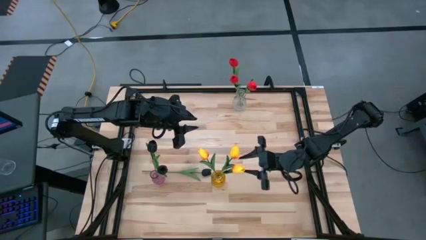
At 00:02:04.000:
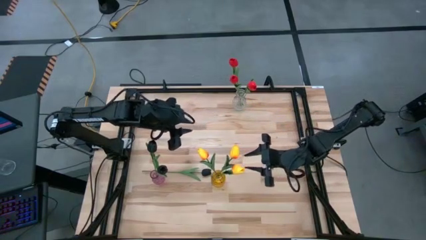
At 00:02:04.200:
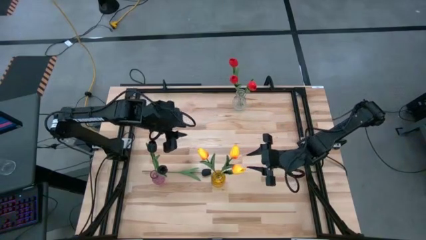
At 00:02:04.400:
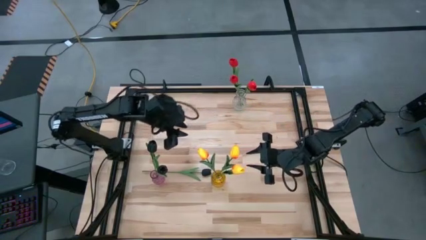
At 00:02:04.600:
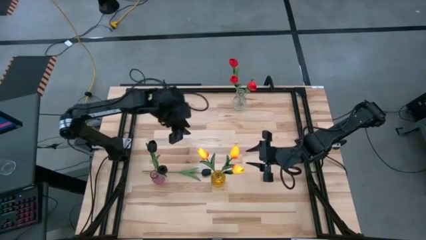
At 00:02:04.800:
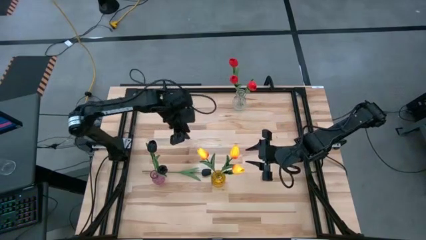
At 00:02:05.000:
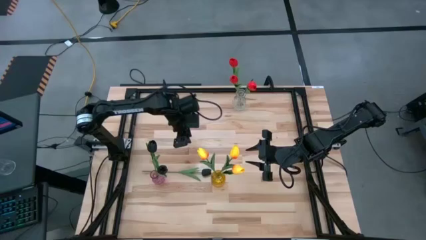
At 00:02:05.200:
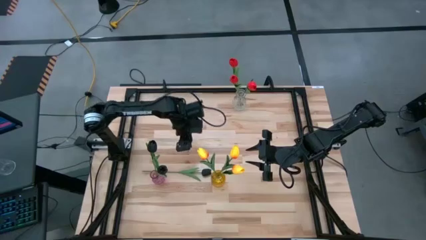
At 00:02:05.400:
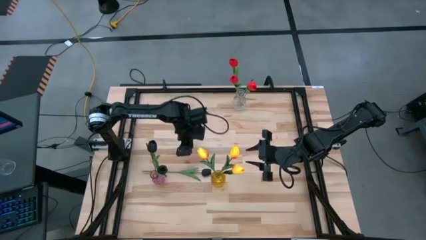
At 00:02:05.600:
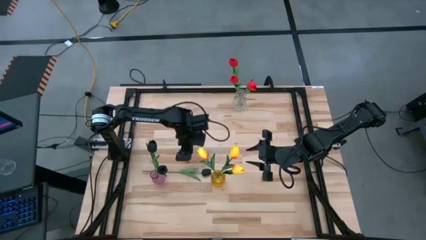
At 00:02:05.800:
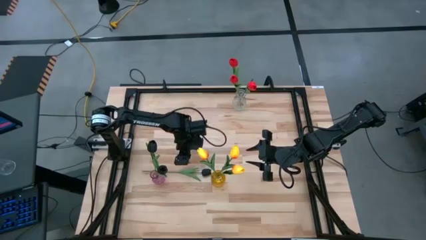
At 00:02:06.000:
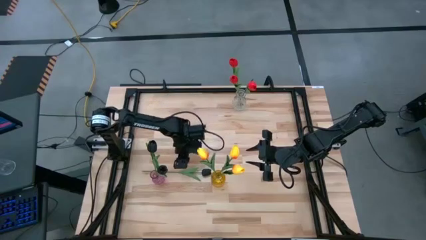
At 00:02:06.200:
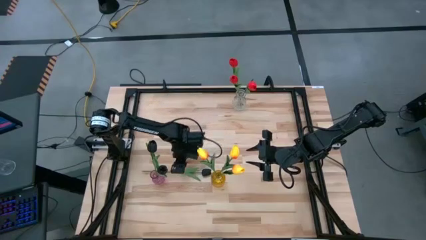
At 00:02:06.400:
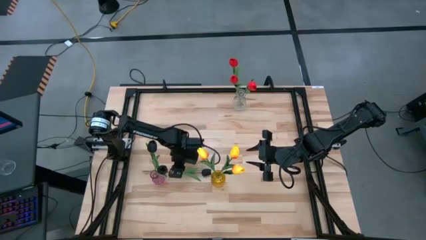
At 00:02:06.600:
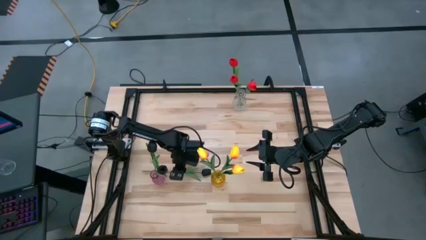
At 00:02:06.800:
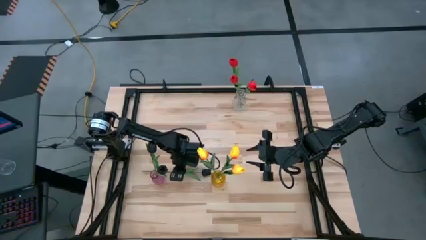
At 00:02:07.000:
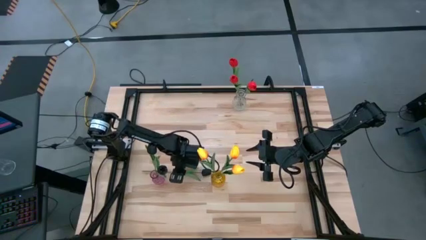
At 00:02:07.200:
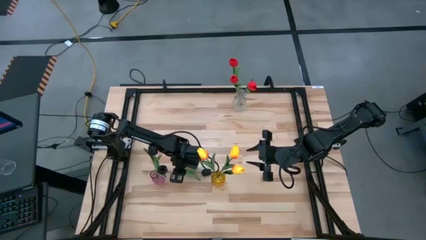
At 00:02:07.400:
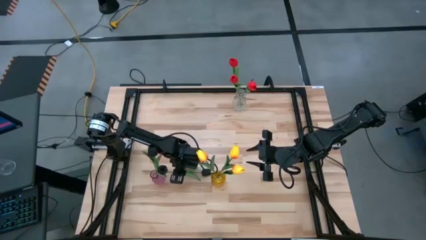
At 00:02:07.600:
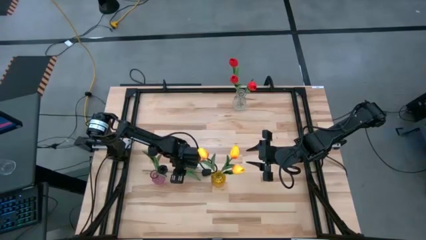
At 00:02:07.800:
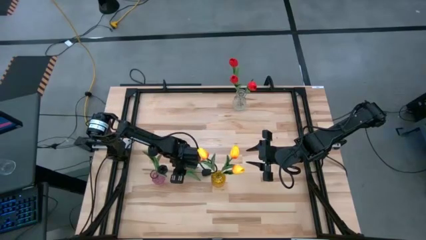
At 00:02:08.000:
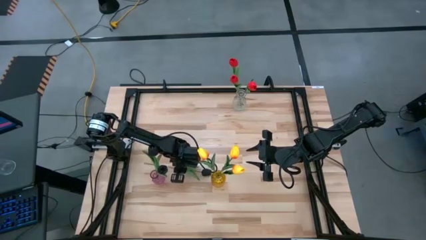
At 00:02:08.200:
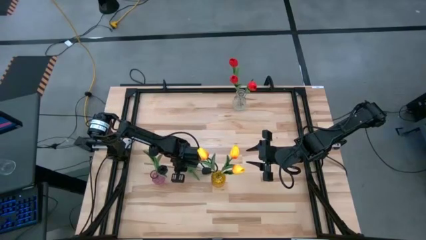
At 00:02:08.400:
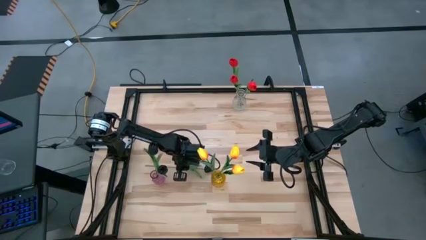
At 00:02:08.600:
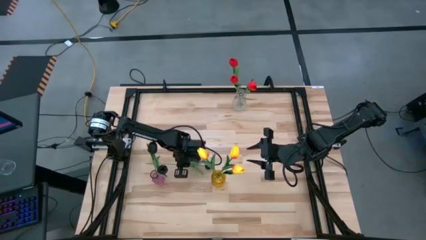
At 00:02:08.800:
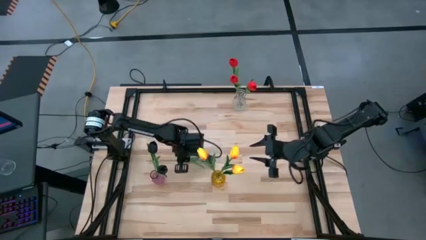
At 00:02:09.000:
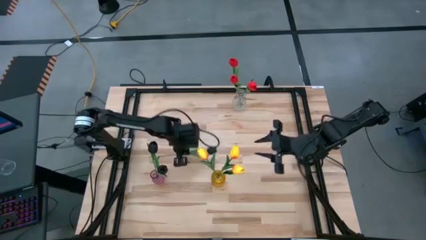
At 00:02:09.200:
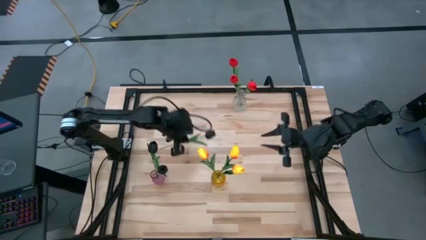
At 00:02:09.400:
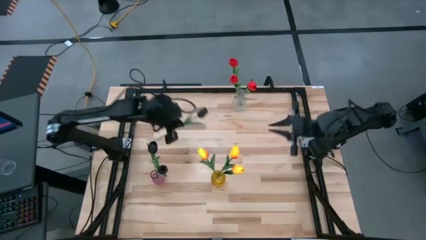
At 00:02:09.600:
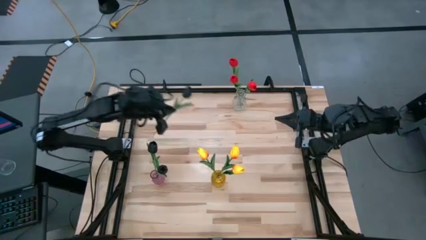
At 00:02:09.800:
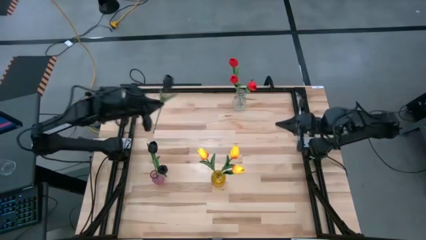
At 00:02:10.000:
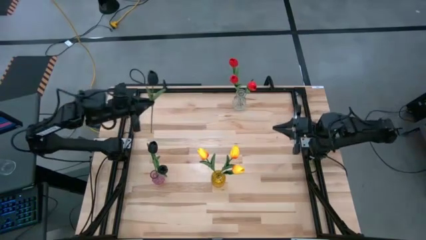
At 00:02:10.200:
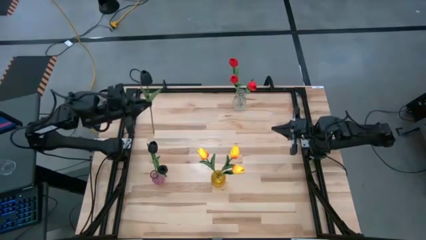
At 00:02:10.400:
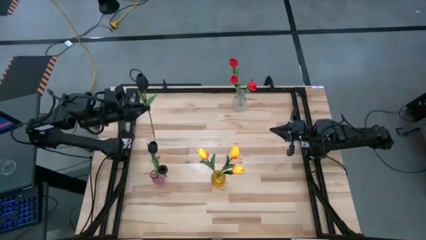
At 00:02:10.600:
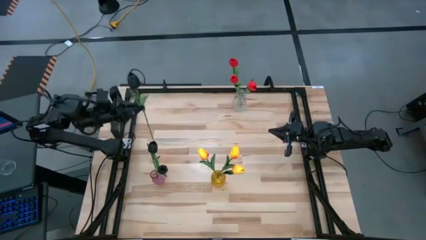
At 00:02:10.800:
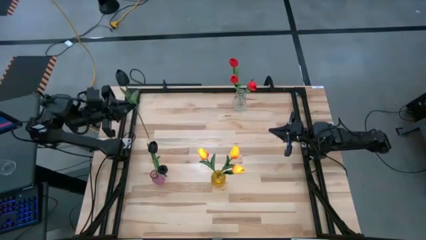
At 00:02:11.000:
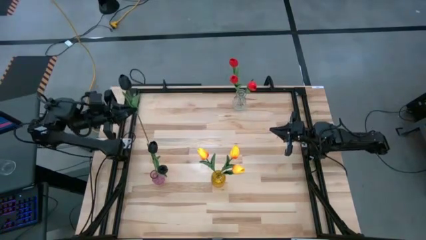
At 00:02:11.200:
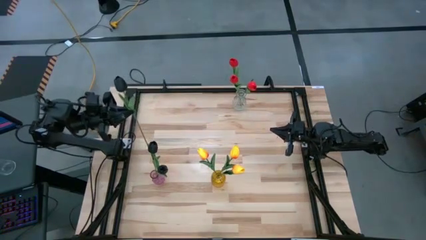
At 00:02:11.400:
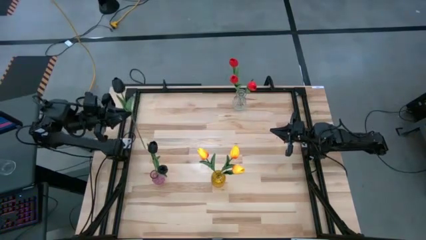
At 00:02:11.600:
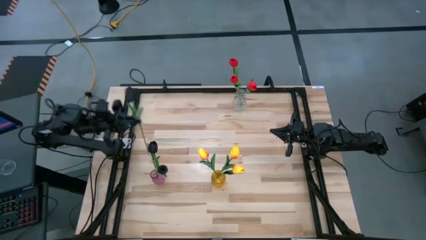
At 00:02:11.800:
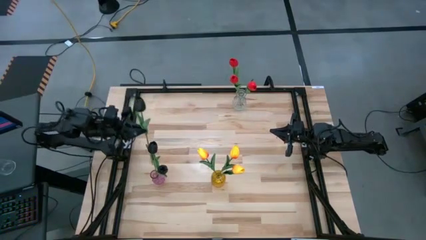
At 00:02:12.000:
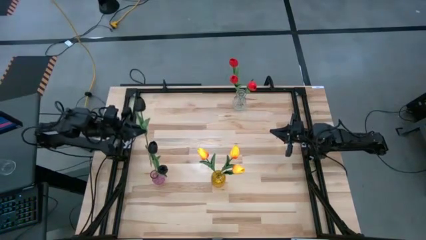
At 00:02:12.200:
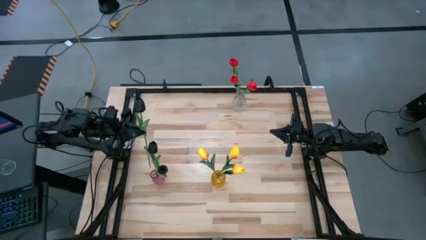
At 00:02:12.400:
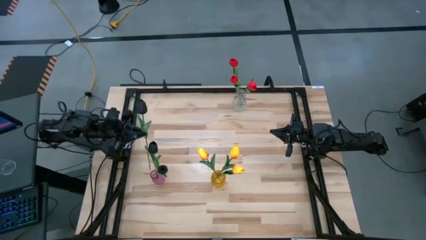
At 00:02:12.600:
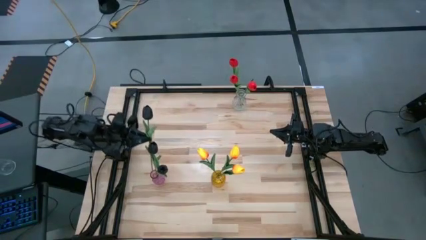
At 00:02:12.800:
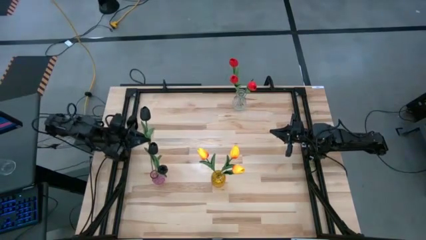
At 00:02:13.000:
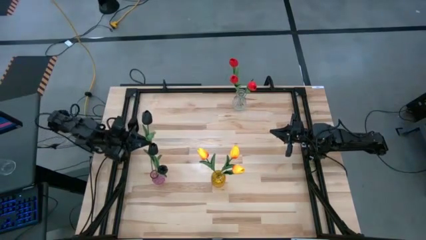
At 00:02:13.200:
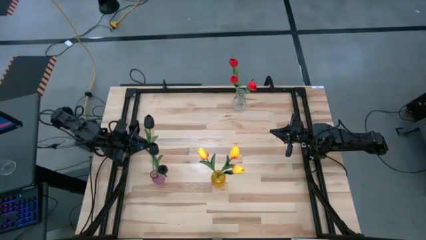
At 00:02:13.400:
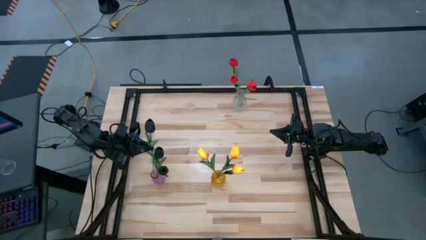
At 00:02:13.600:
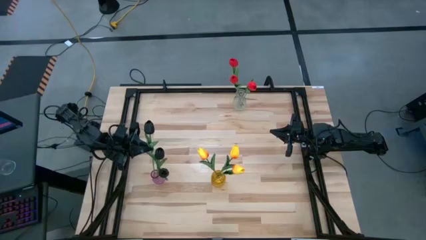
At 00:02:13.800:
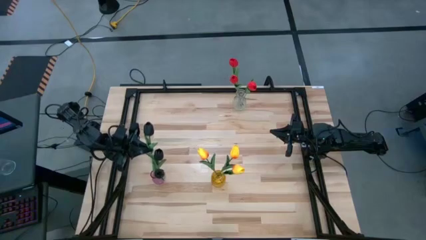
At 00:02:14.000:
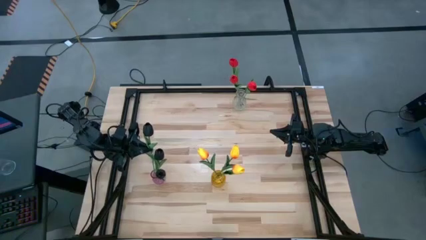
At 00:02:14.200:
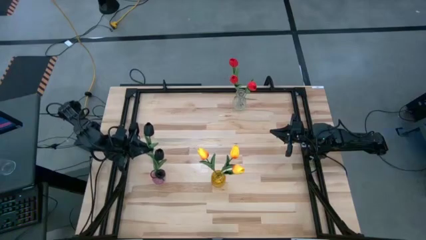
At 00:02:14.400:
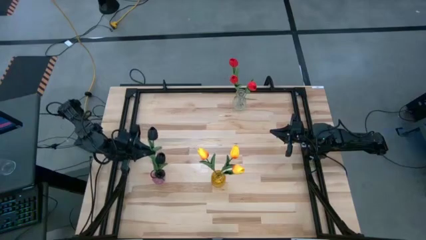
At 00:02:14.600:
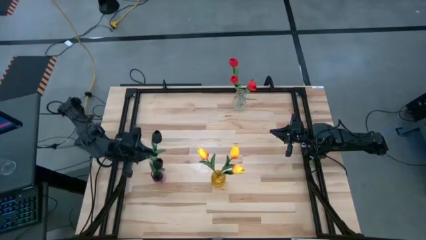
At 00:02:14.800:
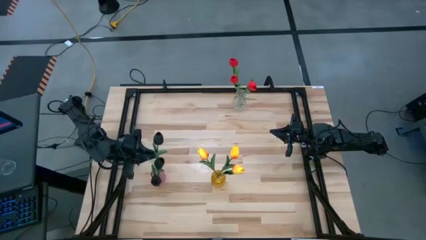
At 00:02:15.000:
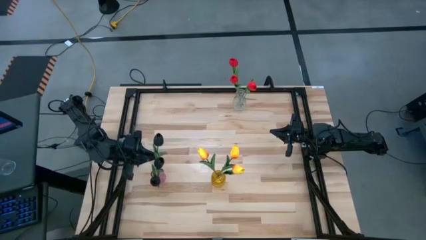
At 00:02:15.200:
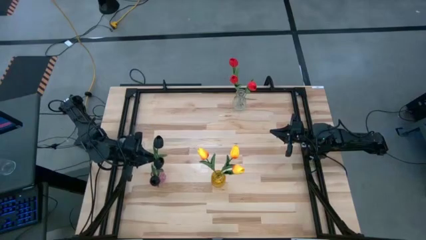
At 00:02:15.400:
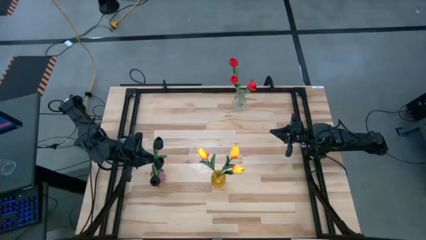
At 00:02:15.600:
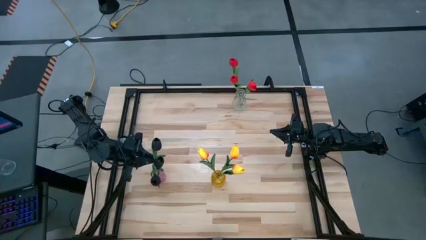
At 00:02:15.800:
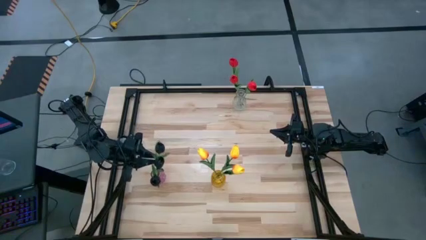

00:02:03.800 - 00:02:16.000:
Task: Sort flowers into vase by color
Put the black flower into the purple vase

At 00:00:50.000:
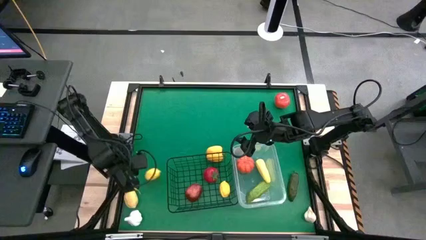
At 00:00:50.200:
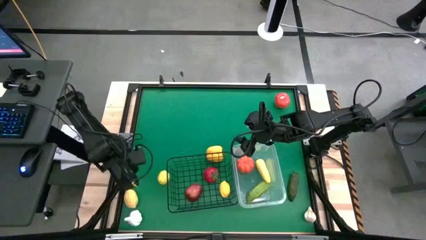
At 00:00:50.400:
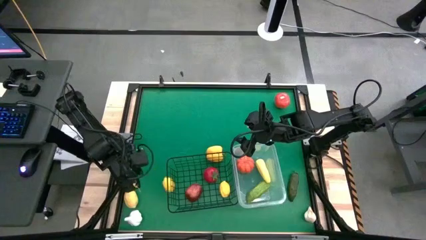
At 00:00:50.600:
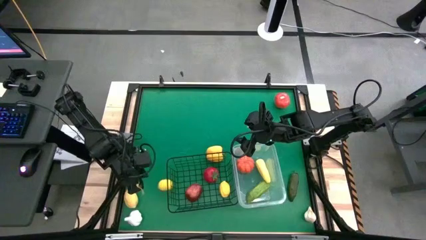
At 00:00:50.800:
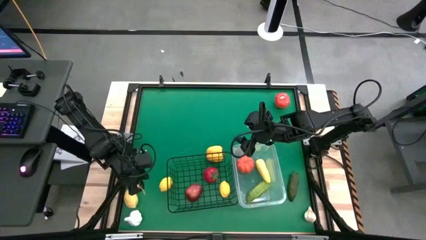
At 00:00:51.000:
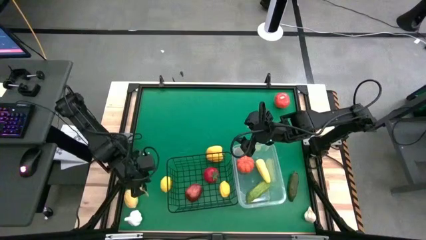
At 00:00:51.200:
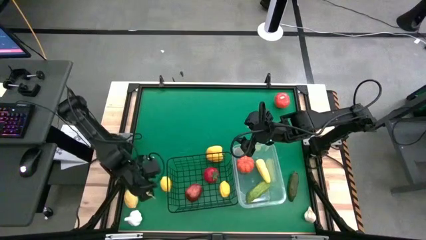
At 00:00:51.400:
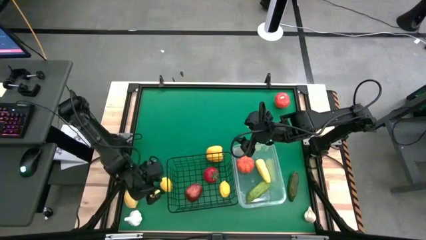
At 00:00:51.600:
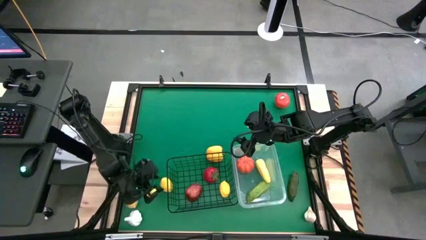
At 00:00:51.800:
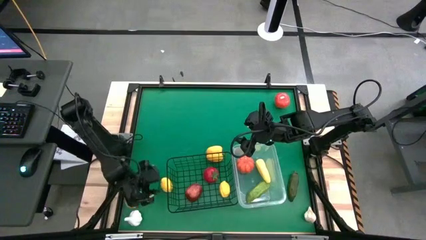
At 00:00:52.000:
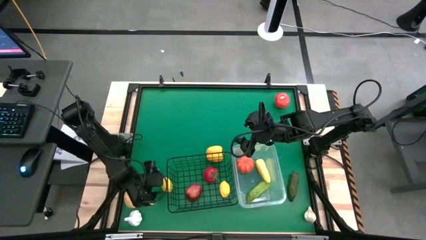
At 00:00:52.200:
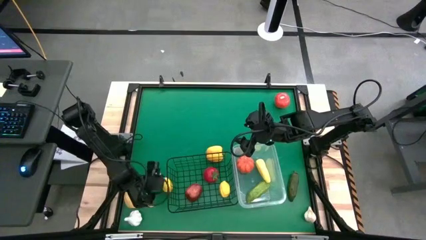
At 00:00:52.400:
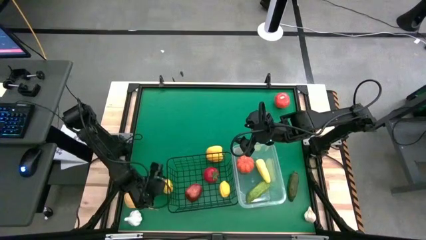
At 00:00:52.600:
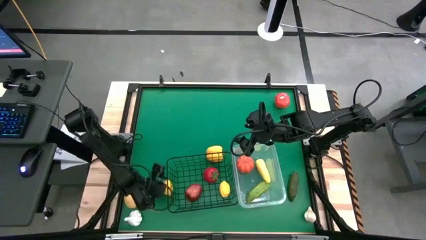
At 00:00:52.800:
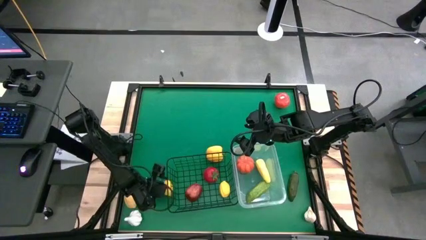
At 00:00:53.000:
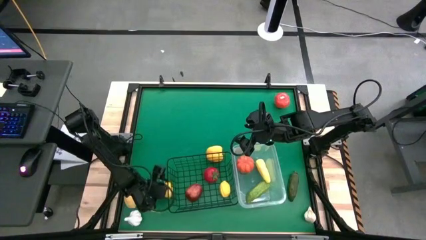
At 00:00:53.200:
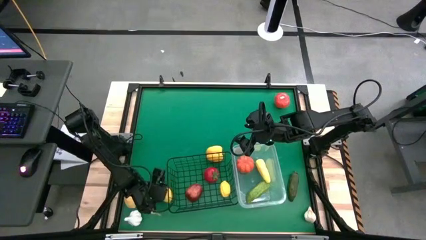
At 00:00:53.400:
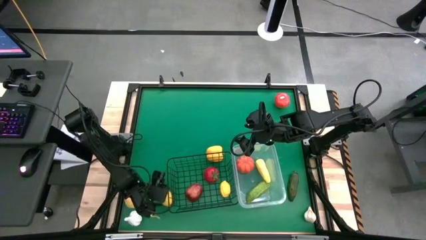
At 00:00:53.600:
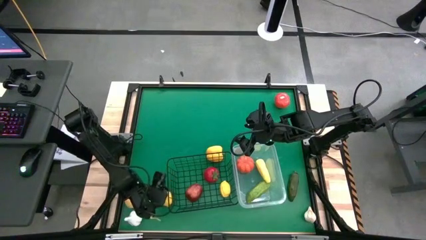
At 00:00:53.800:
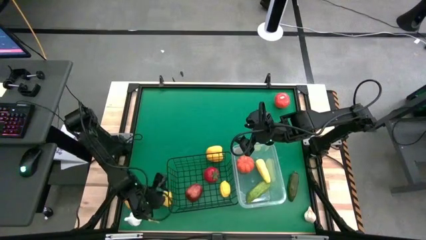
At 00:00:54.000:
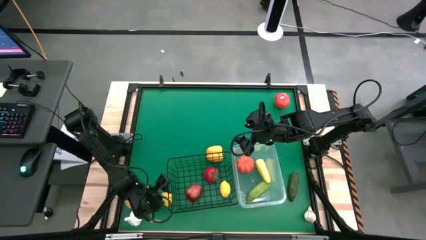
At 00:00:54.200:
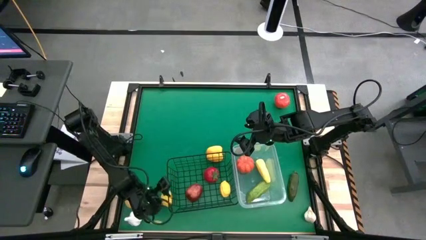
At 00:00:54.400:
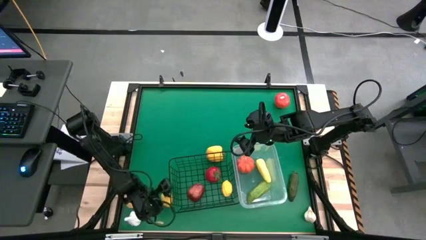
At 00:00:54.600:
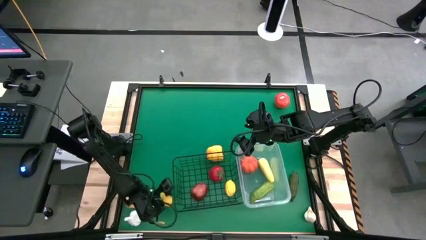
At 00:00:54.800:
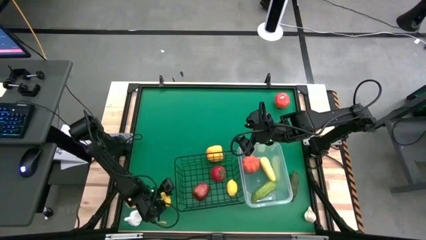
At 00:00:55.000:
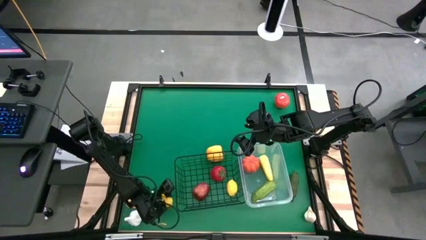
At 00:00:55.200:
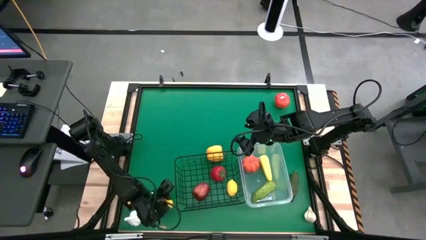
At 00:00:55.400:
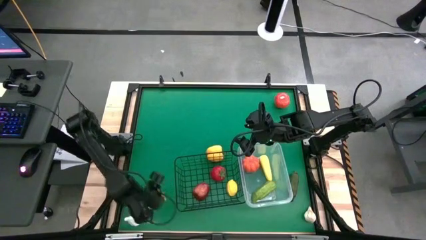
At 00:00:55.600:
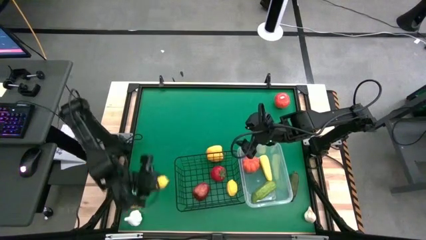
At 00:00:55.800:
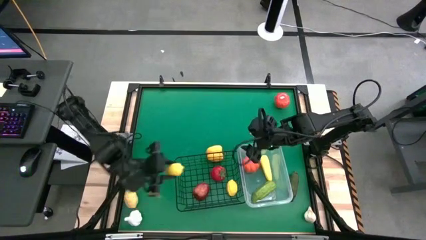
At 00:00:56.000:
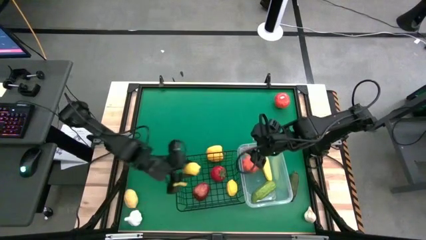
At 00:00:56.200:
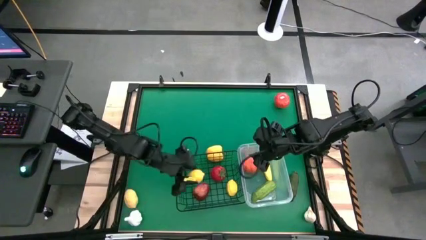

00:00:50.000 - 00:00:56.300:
Task: Sort produce into baskets
Put the top lemon into the wire basket
